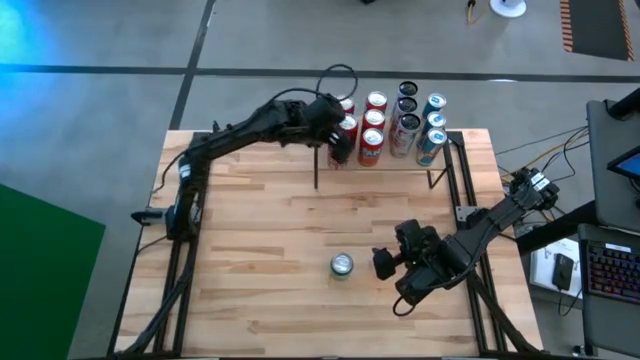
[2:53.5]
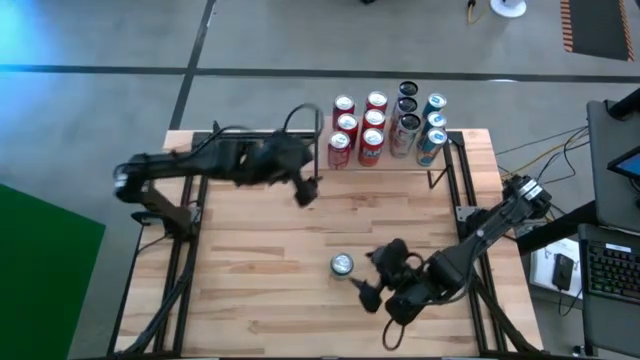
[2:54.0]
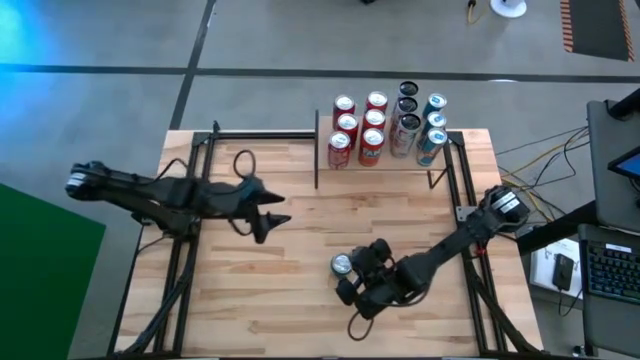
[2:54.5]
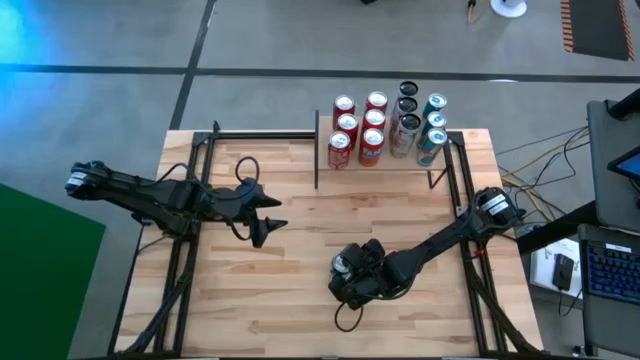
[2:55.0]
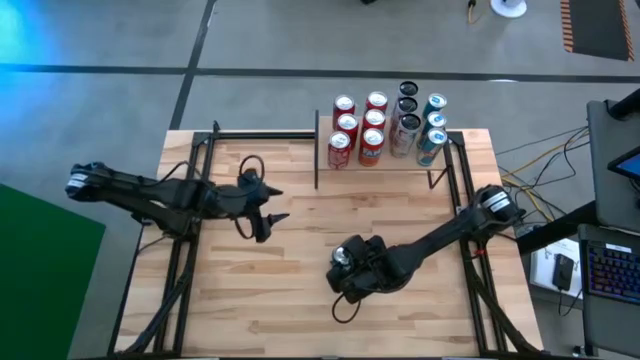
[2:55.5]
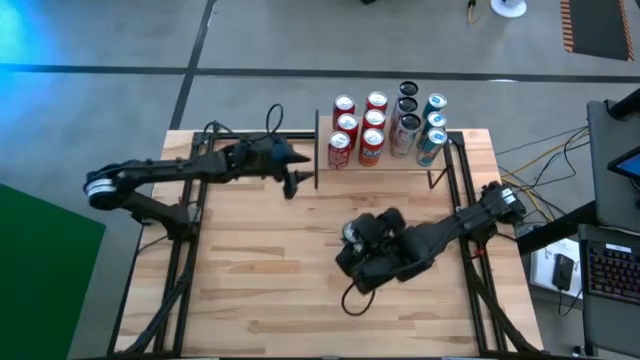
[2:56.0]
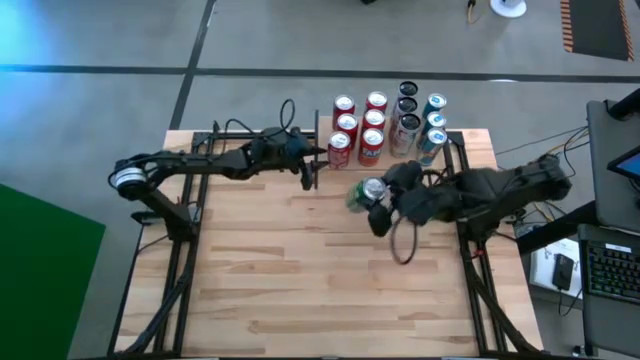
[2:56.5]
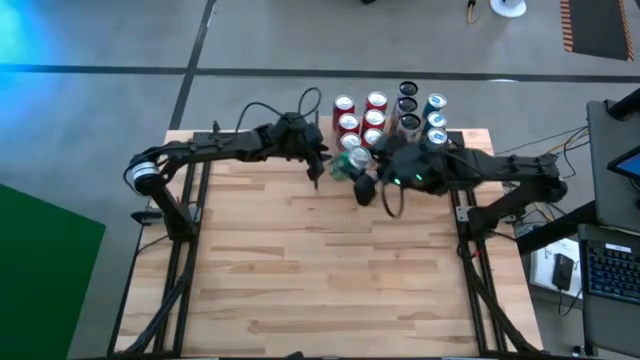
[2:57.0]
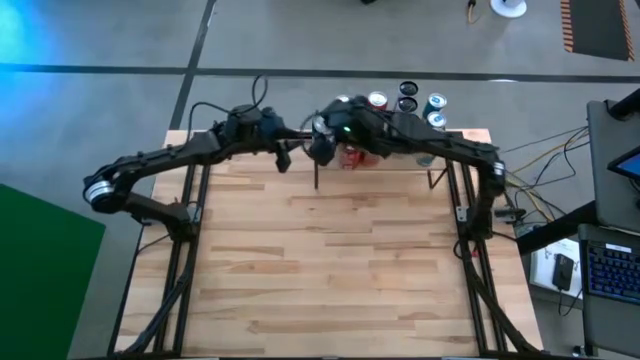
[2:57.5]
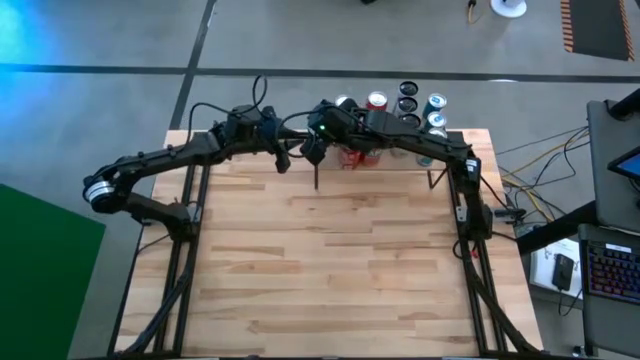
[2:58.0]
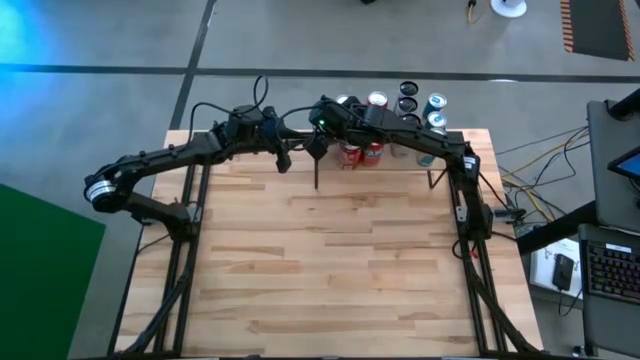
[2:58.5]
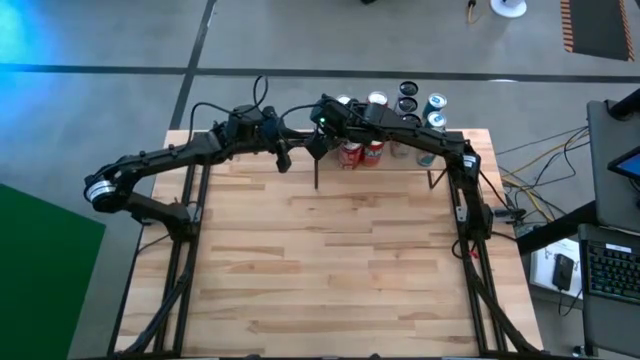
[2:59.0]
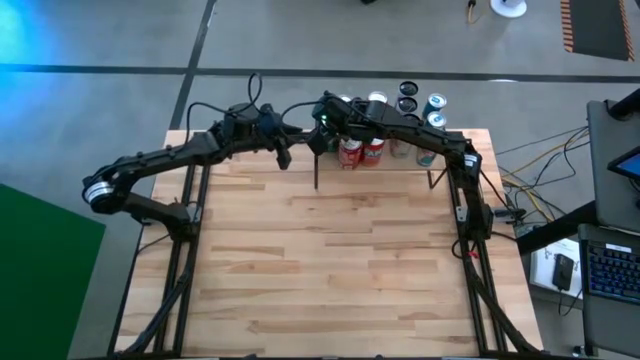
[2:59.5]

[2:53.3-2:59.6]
Task: Place canned beverage on shelf
Put the green soda can on the shelf

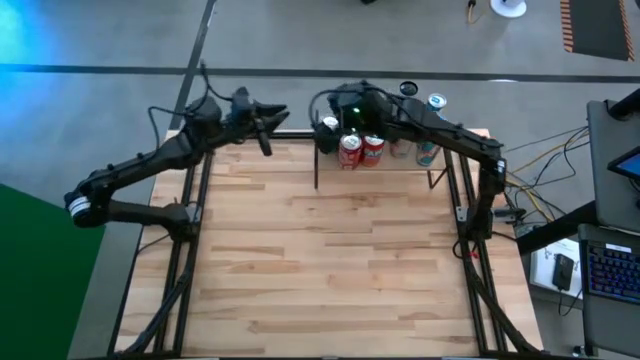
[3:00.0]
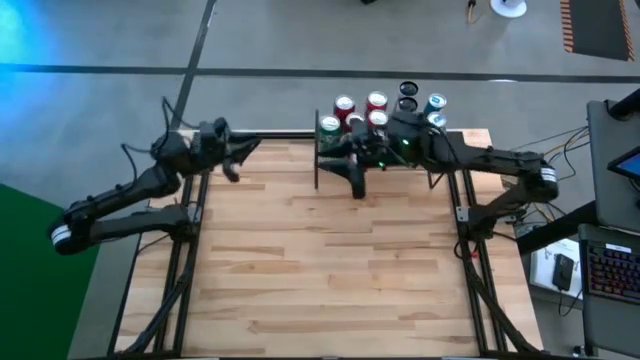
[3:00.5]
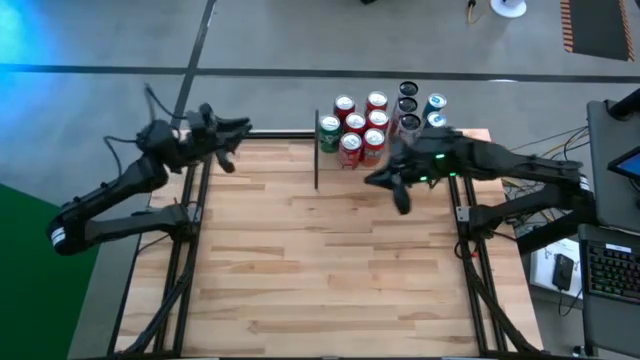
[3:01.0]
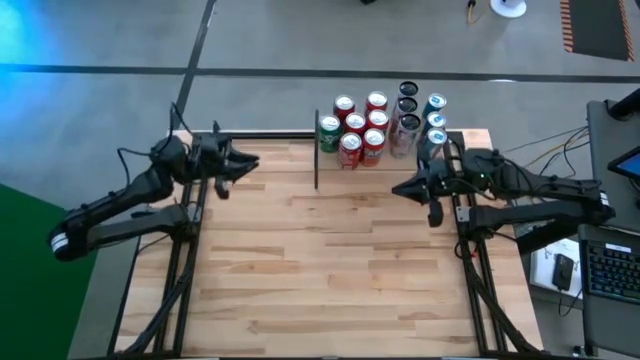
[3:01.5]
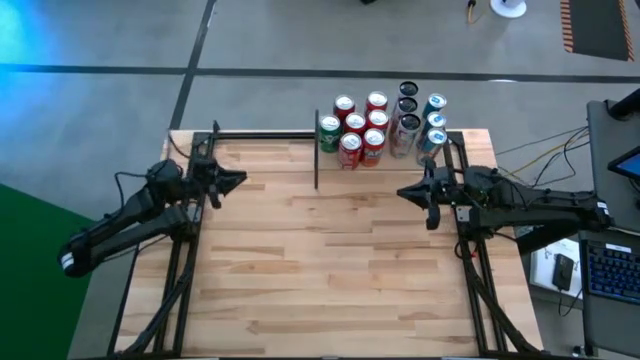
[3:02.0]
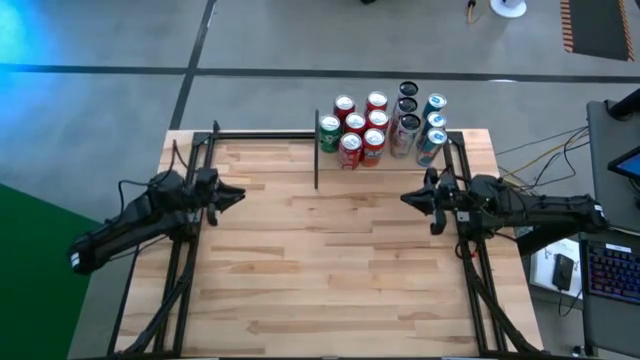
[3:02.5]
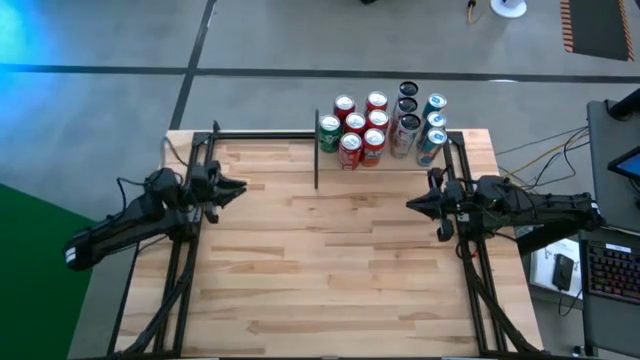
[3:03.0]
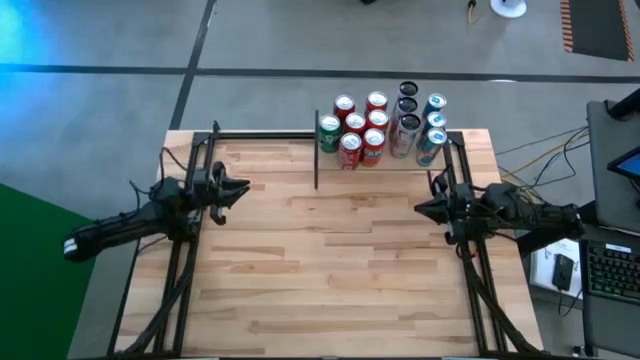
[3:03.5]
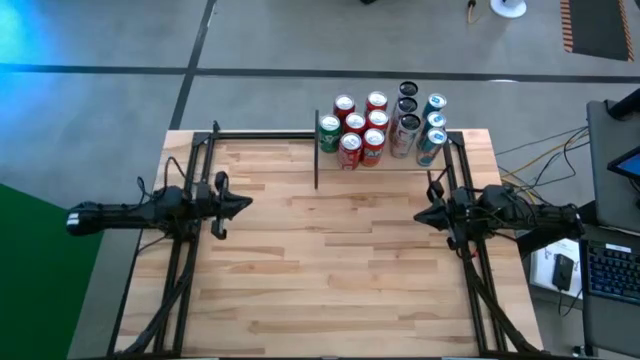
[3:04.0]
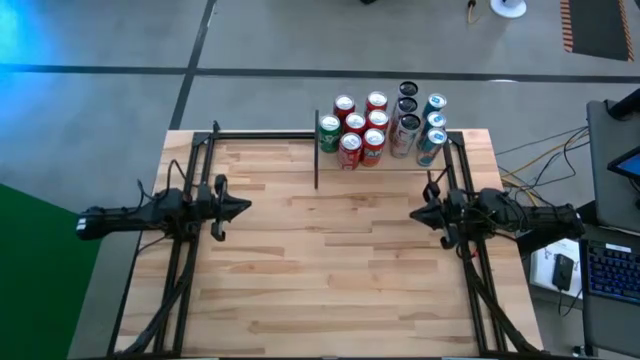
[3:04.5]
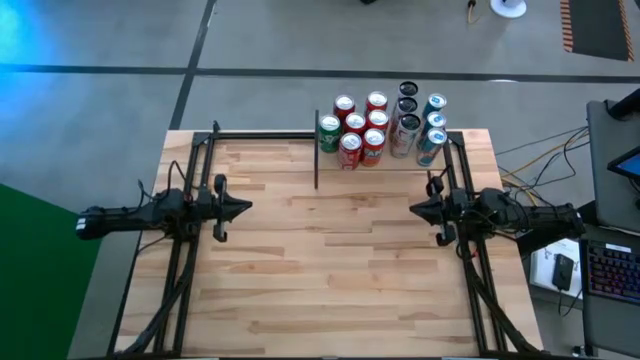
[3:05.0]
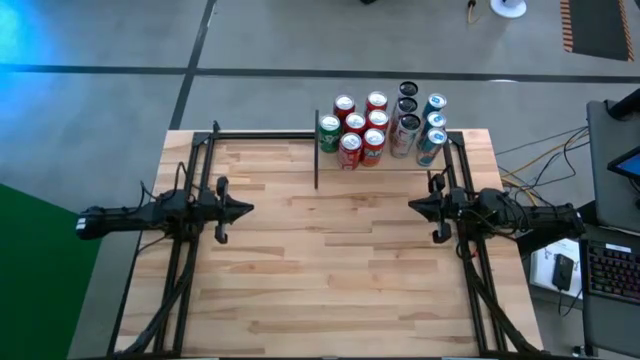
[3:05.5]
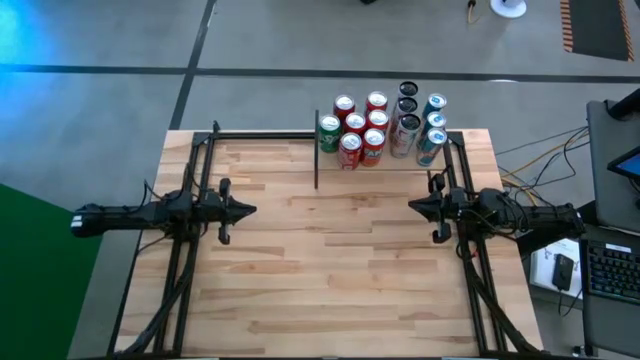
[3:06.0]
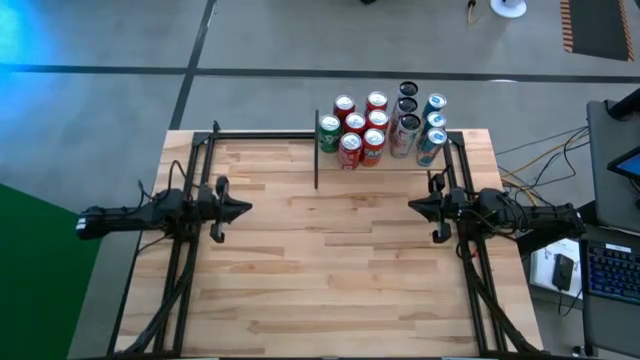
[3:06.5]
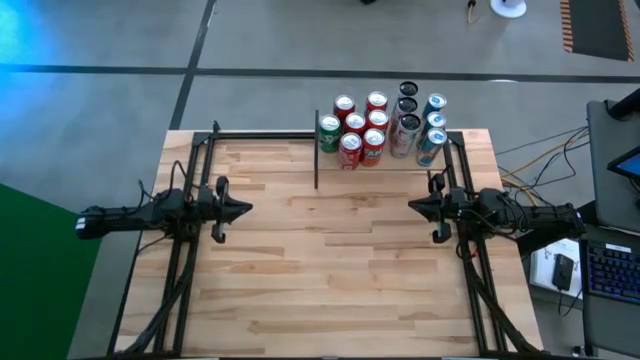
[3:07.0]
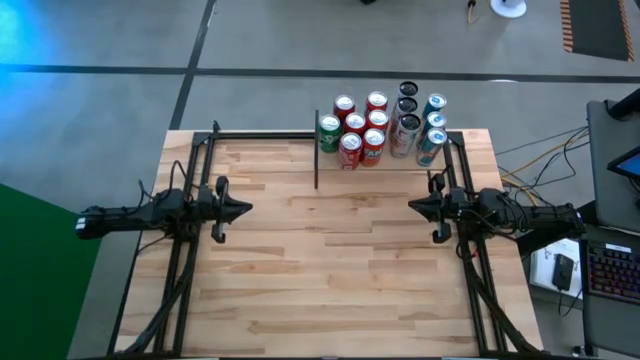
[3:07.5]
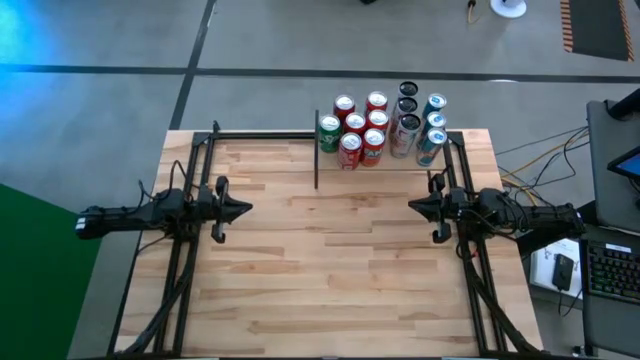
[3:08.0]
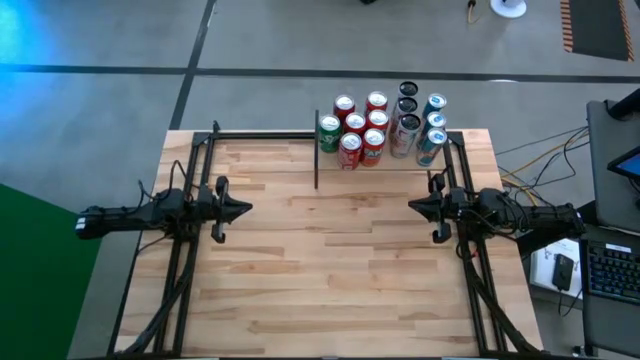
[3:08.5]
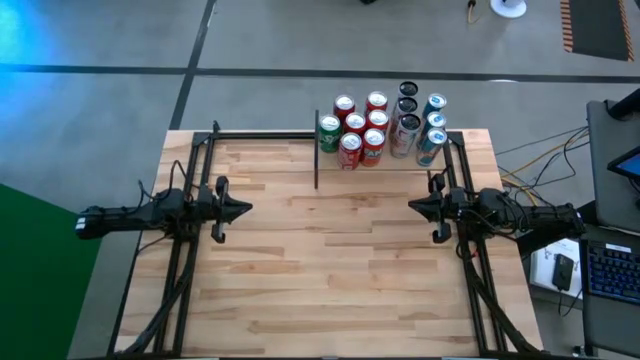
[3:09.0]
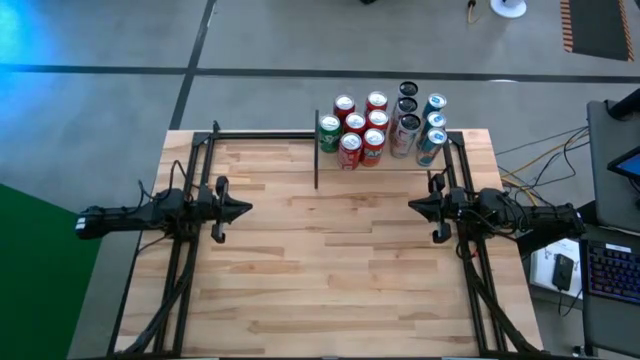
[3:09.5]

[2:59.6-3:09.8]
Return to Home Position

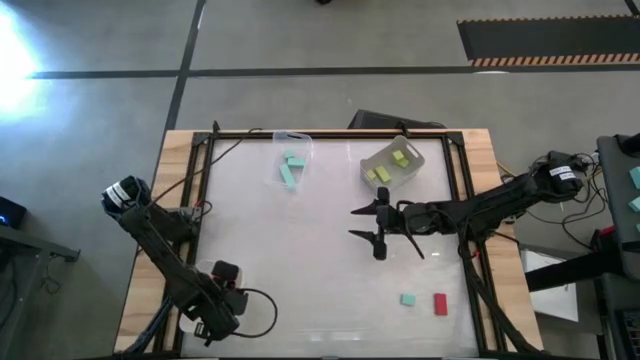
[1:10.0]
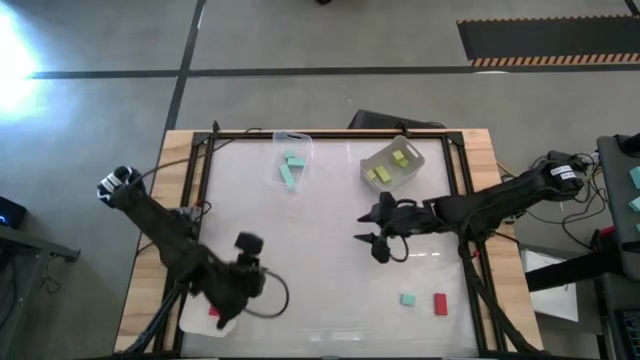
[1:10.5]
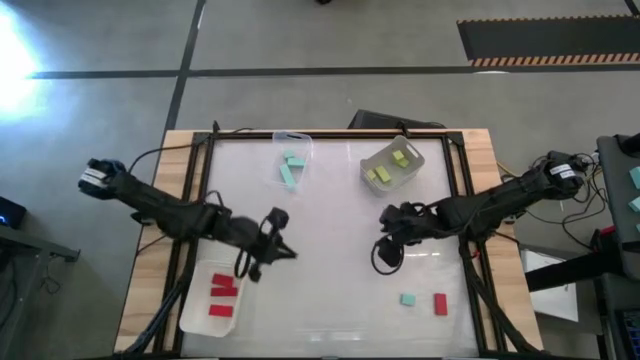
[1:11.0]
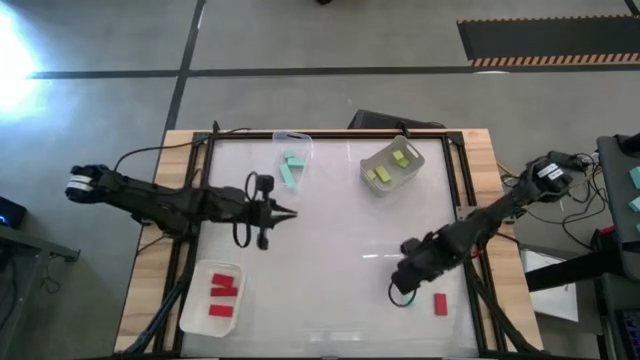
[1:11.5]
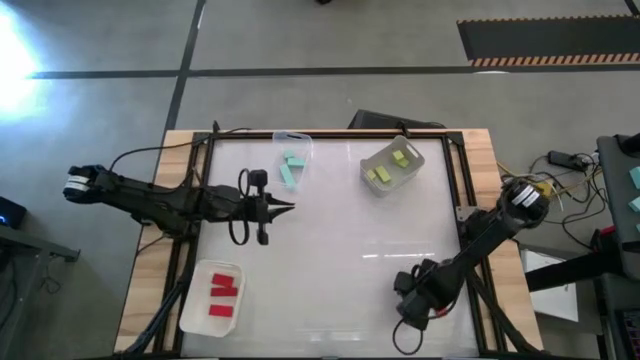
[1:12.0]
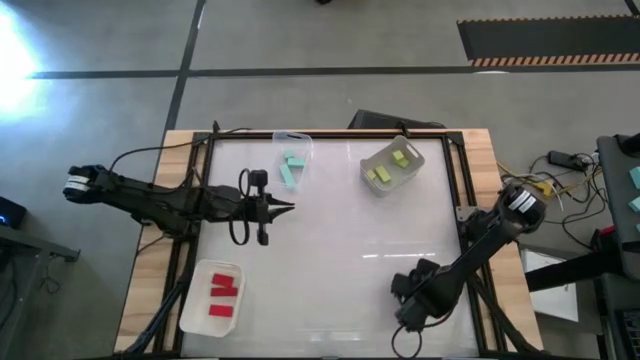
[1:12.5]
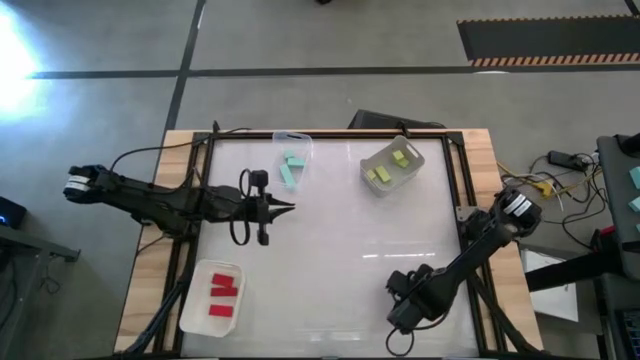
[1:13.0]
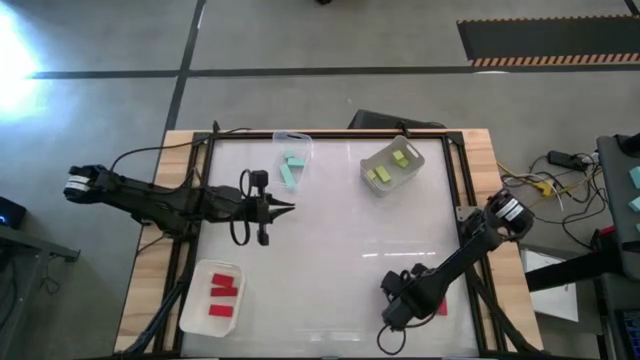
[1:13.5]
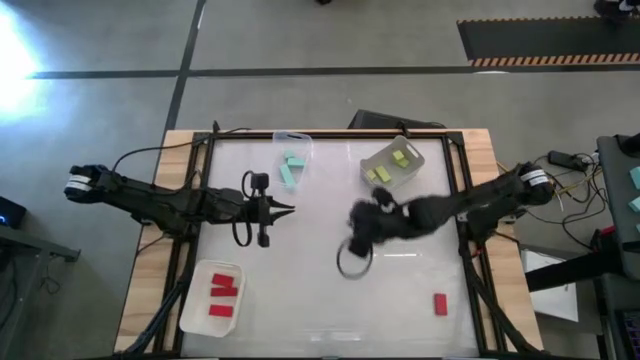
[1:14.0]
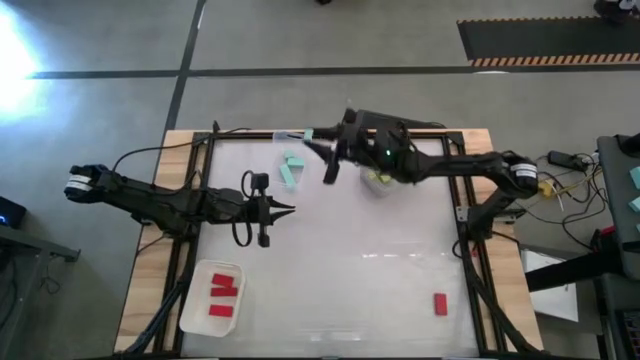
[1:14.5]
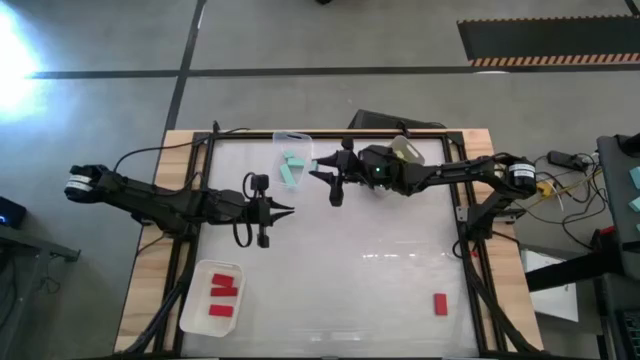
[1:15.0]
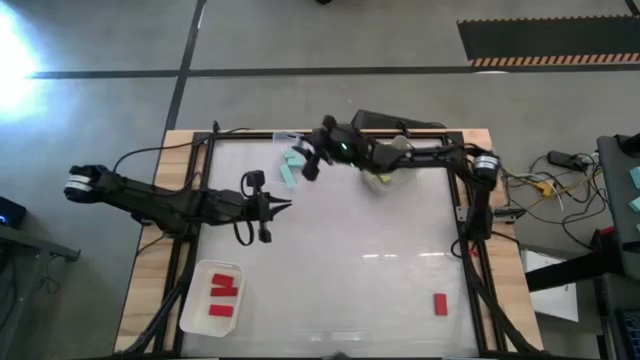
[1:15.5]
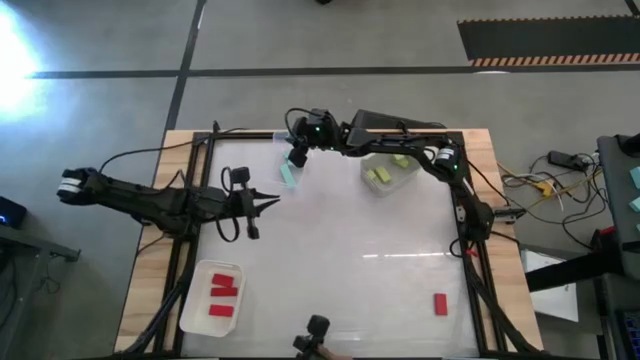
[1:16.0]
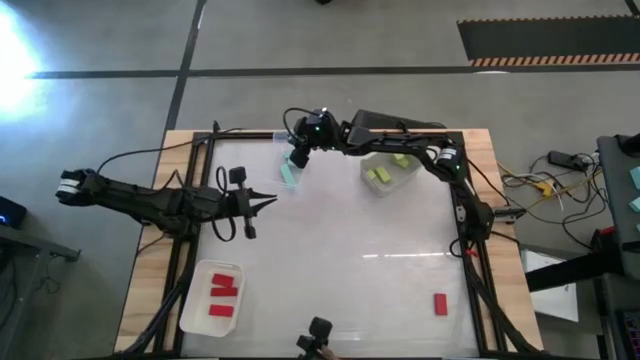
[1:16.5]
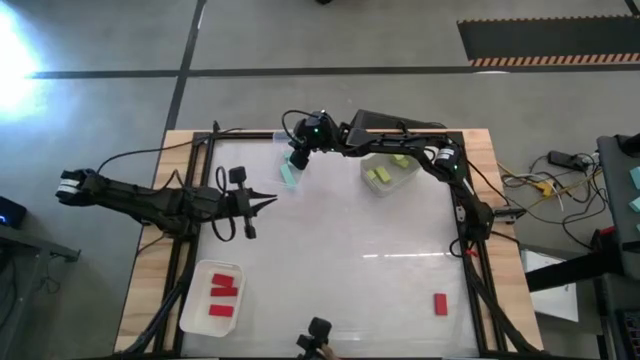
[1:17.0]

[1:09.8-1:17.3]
Task: Sort & place blocks by color
Put the light blue block into the transparent bin
